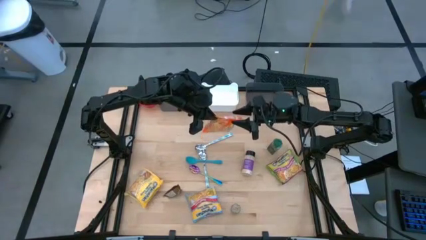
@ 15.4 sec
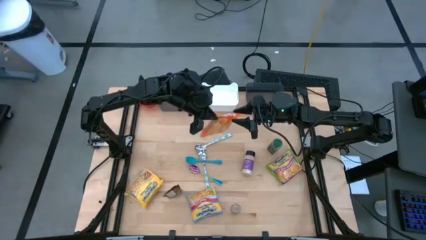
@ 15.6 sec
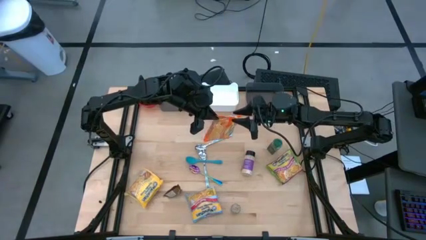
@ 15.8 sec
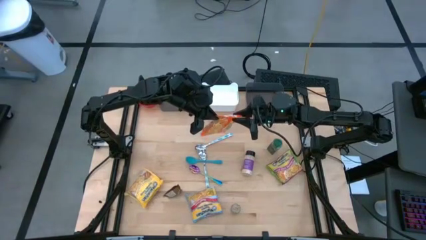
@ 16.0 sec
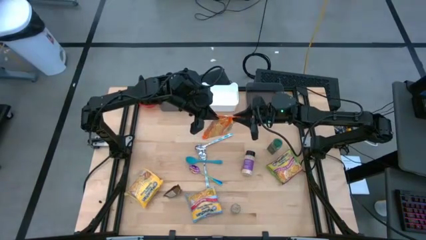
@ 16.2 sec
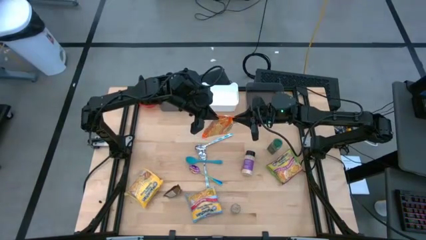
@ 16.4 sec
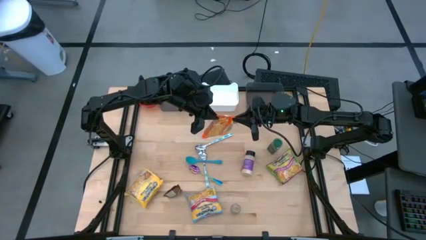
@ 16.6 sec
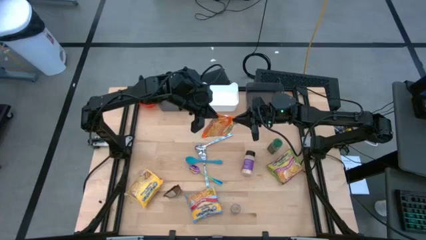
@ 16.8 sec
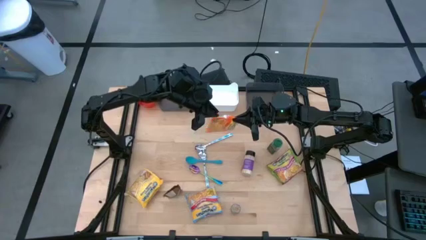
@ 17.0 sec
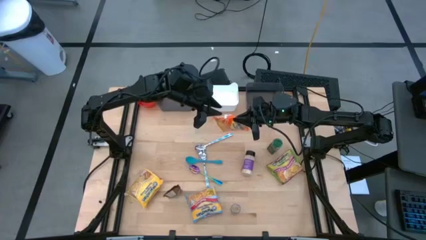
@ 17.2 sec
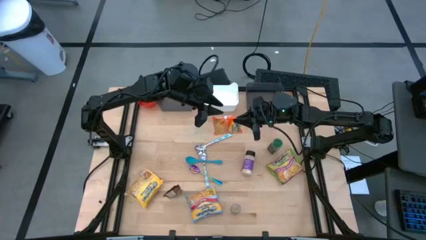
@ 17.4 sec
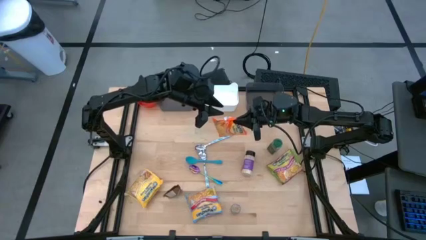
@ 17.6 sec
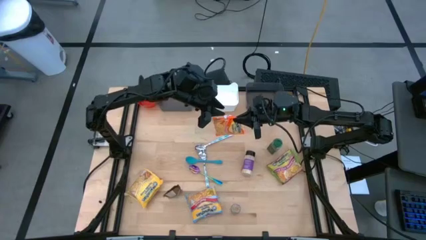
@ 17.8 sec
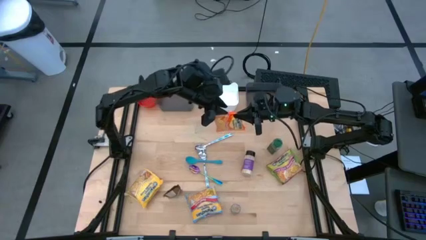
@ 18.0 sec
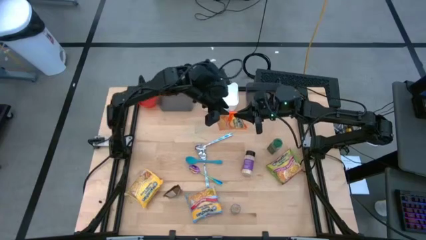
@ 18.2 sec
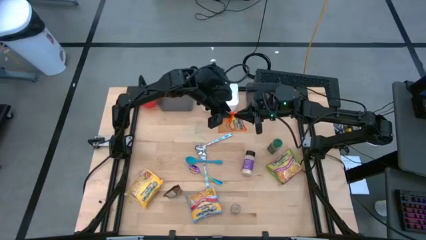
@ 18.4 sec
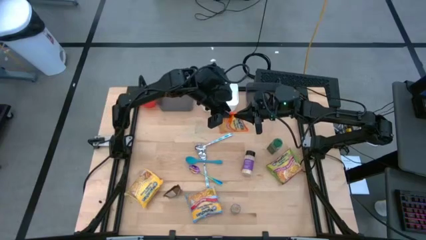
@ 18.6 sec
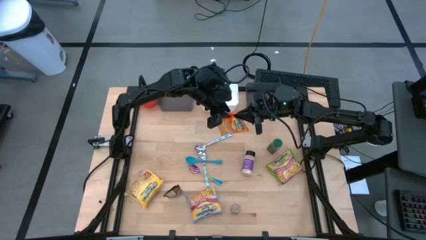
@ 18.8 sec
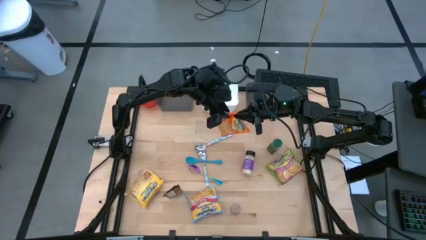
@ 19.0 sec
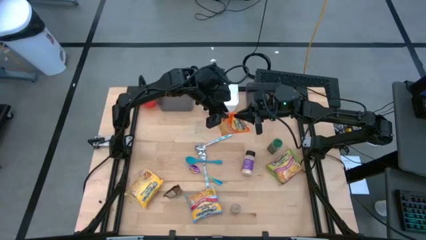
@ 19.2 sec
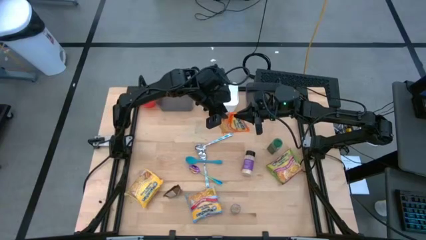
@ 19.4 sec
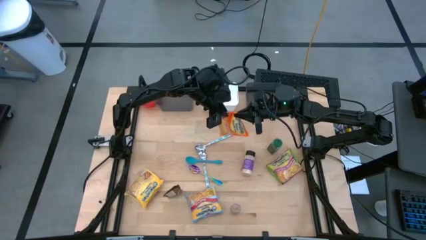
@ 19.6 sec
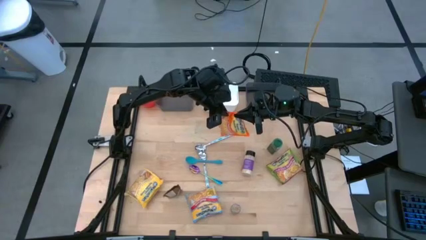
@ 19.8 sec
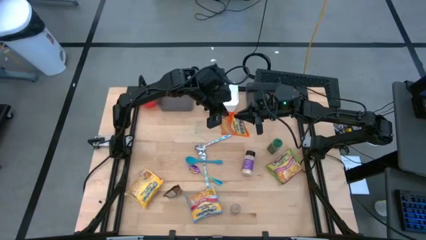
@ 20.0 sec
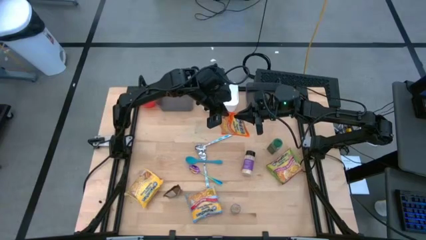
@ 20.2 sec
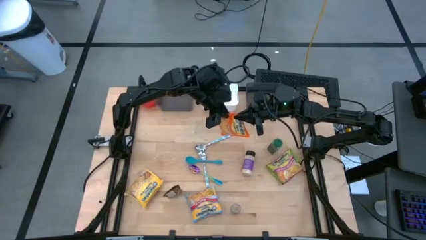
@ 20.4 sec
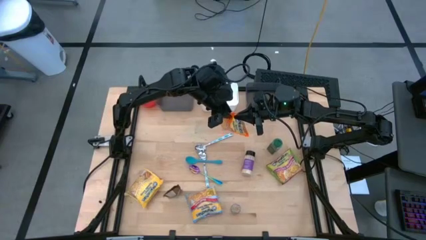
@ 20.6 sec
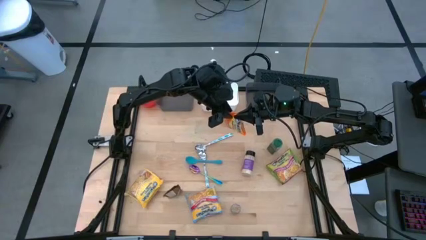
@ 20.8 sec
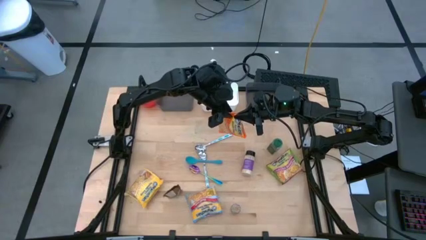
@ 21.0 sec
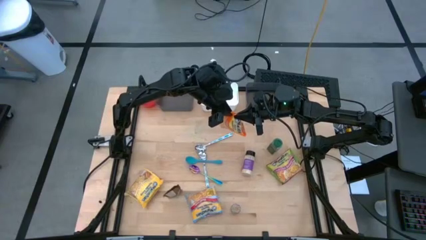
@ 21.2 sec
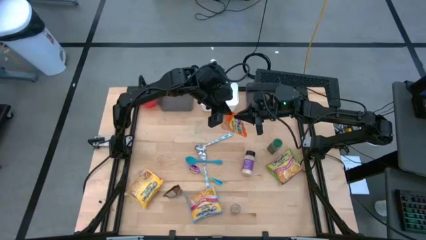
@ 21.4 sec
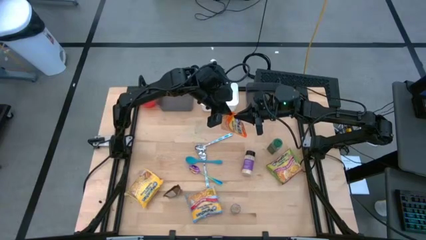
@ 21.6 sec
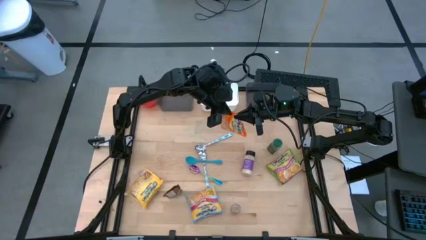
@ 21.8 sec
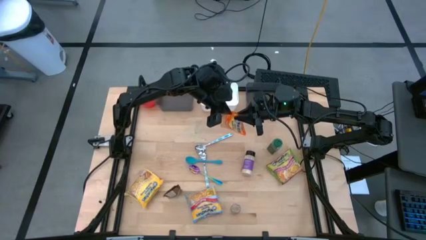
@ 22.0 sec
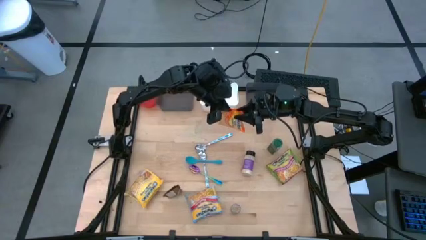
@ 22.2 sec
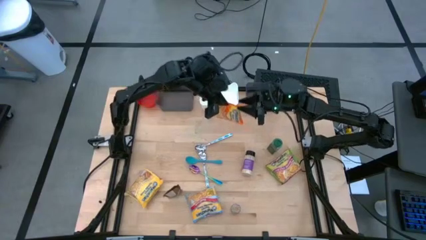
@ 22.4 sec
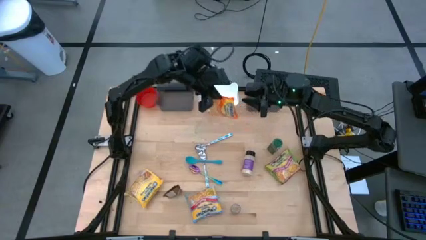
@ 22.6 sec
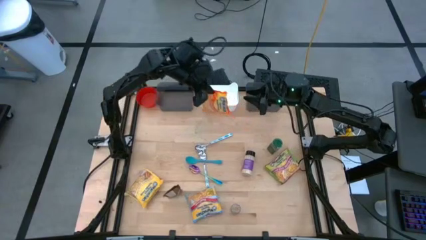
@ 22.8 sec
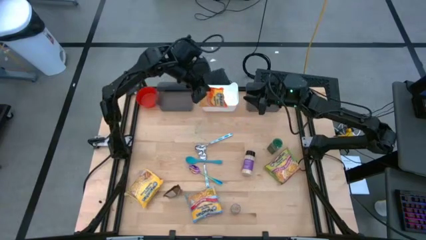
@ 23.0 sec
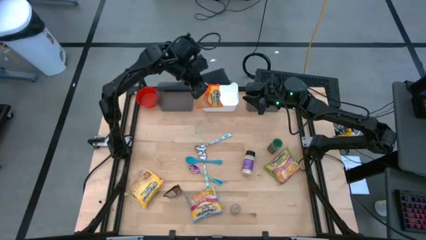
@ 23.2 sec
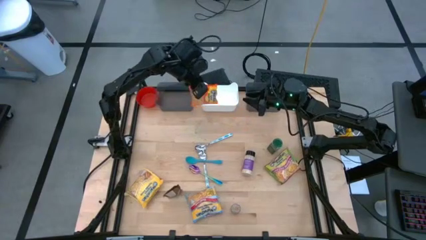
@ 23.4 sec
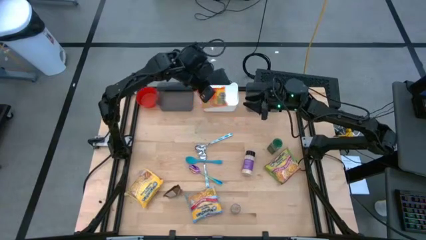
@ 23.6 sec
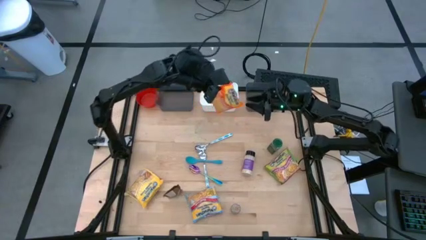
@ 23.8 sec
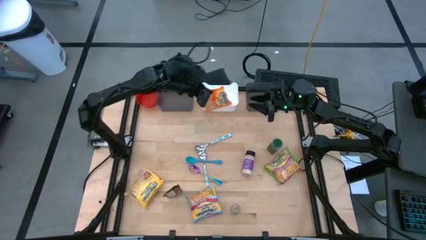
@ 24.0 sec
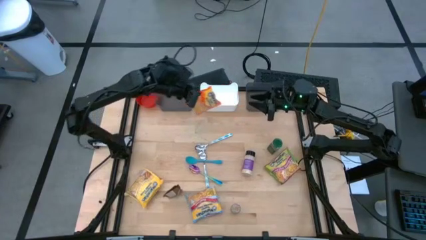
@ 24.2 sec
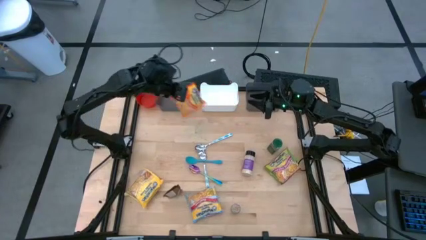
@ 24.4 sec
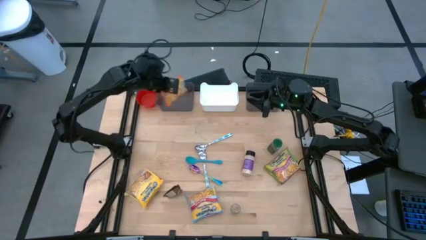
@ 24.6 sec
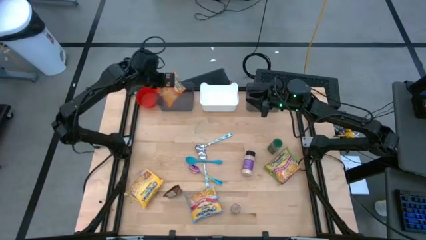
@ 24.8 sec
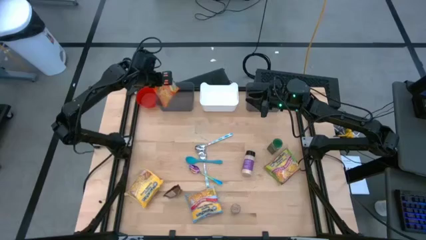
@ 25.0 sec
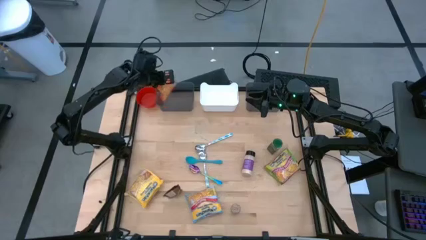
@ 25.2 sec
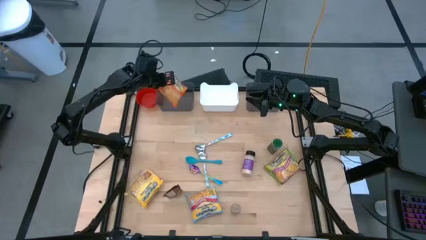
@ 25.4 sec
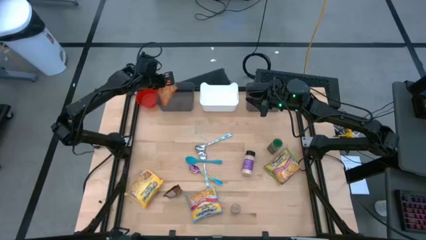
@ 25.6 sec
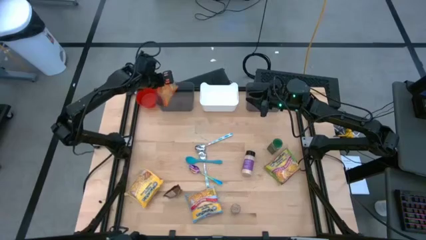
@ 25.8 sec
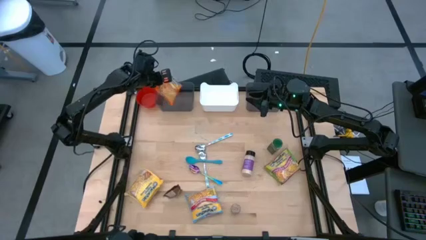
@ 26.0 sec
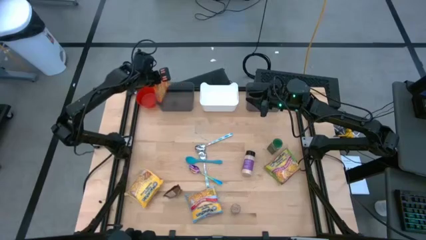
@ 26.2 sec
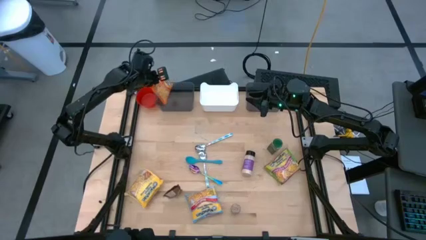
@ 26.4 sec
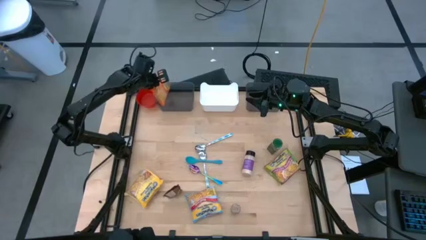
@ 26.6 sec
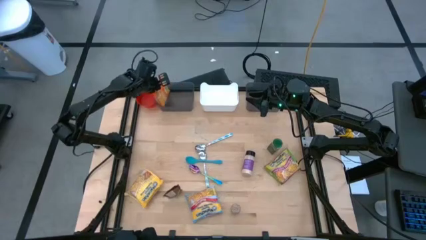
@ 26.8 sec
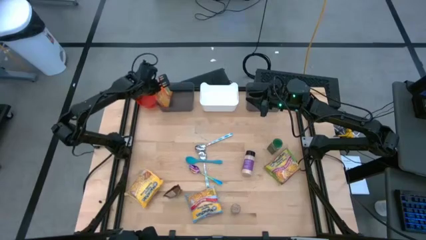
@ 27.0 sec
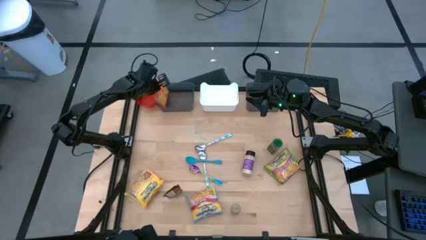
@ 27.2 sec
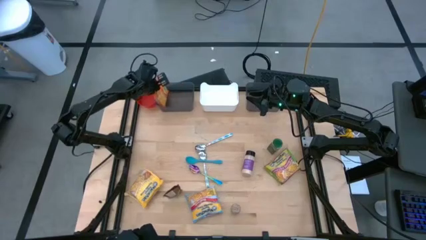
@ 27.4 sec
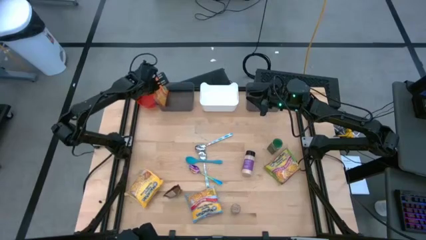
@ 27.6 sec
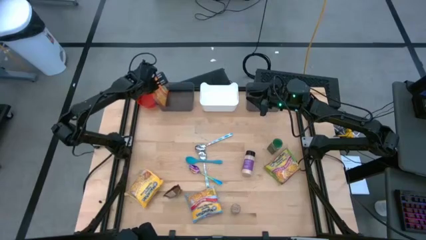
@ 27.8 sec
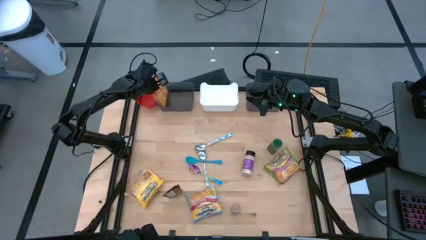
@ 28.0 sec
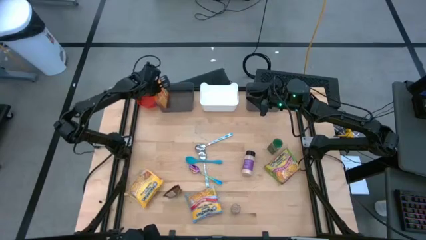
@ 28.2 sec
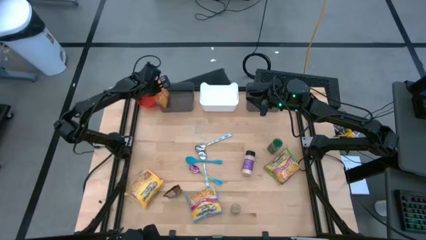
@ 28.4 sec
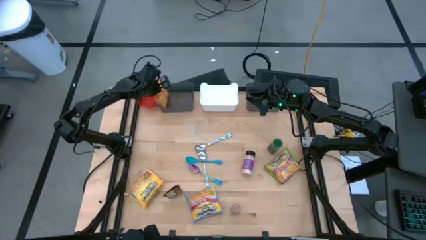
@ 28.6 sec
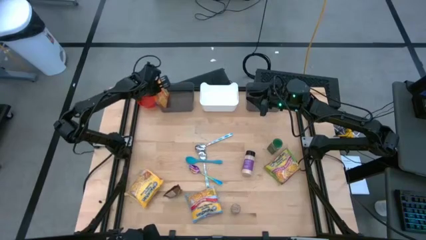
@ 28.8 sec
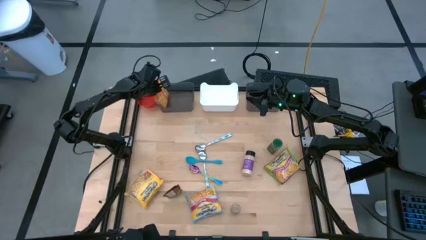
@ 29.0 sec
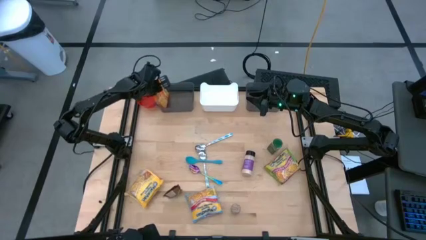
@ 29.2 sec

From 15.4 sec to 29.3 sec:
Task: Pick & Place Food Item
Put the orange noodle pack into the left black bin
